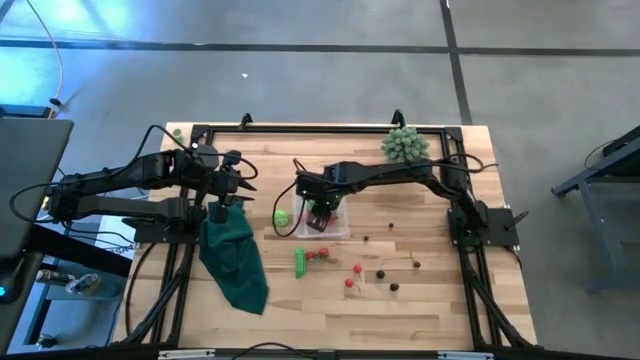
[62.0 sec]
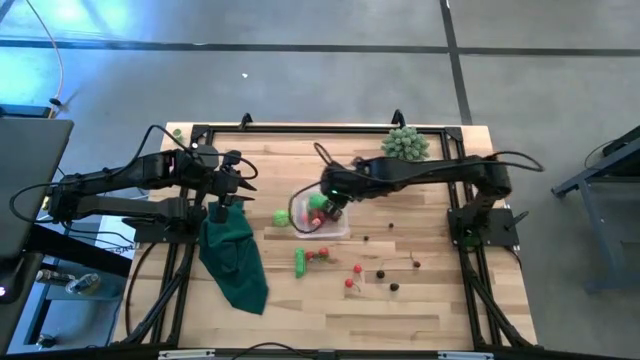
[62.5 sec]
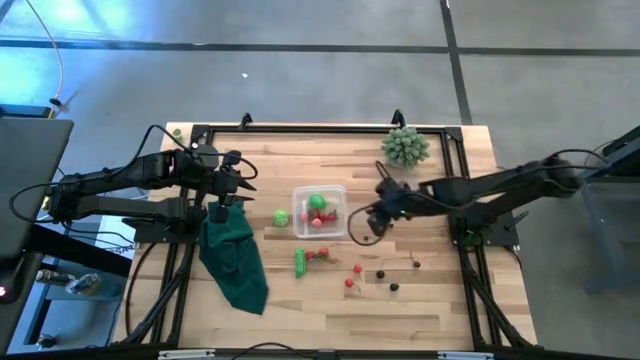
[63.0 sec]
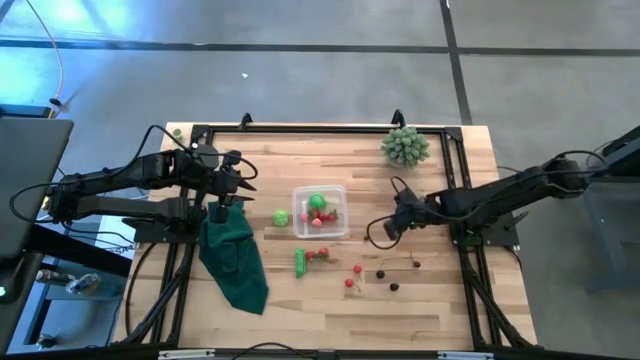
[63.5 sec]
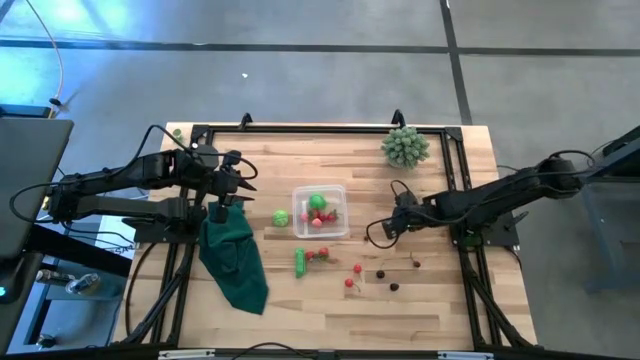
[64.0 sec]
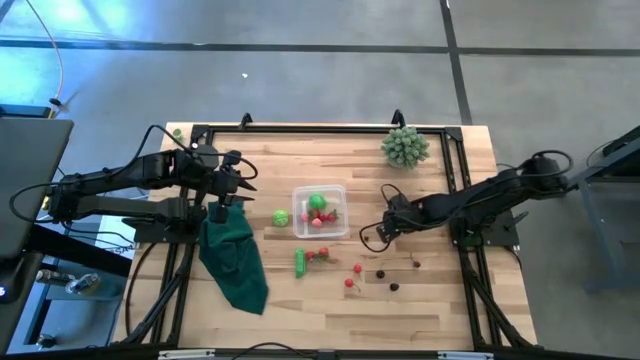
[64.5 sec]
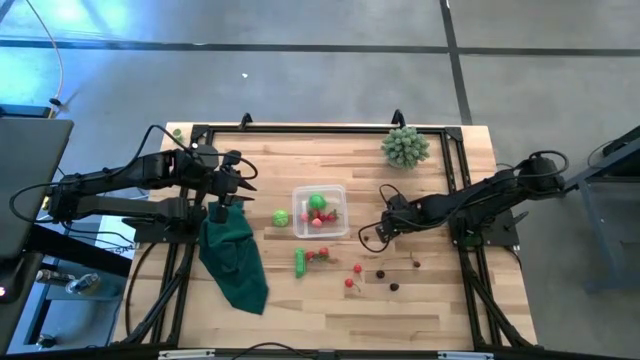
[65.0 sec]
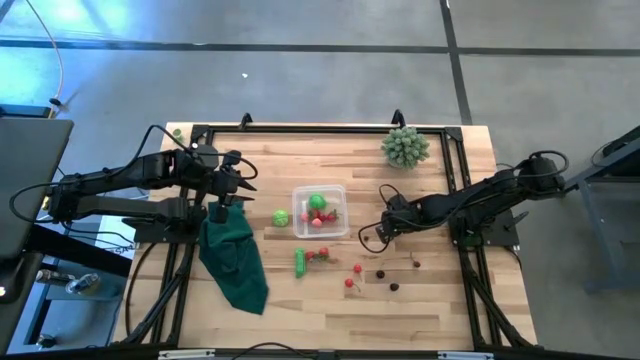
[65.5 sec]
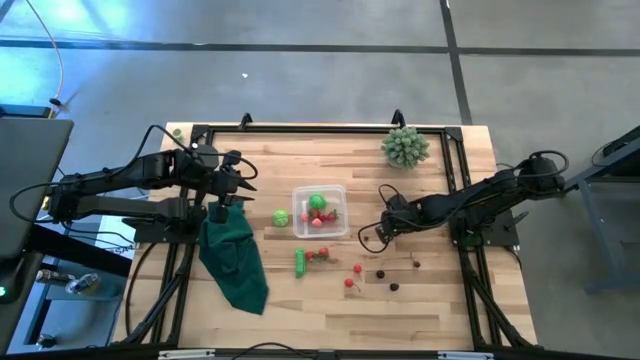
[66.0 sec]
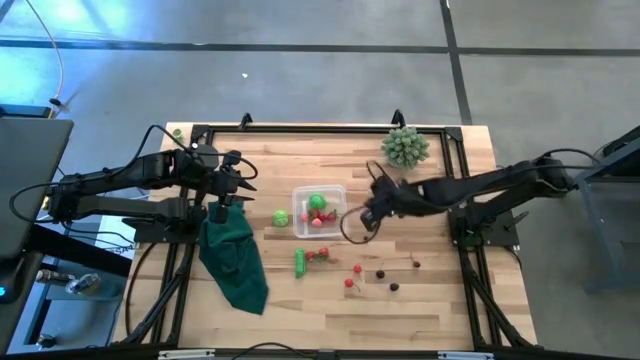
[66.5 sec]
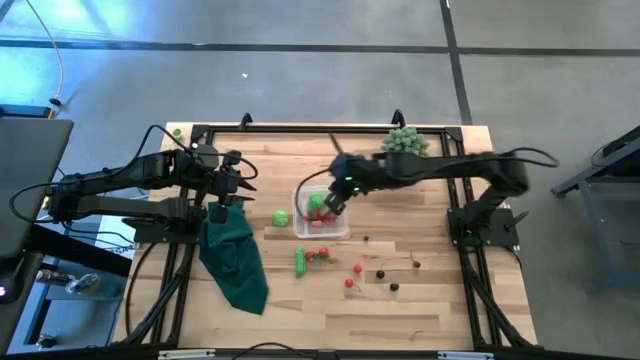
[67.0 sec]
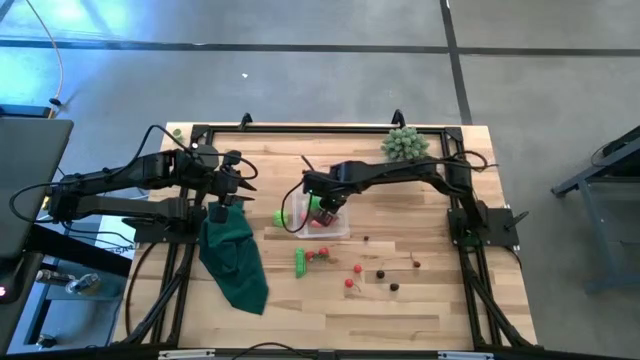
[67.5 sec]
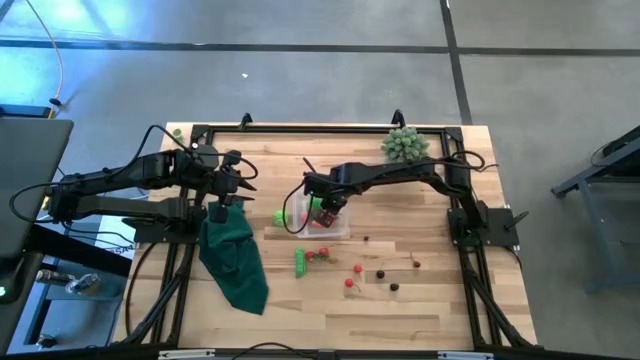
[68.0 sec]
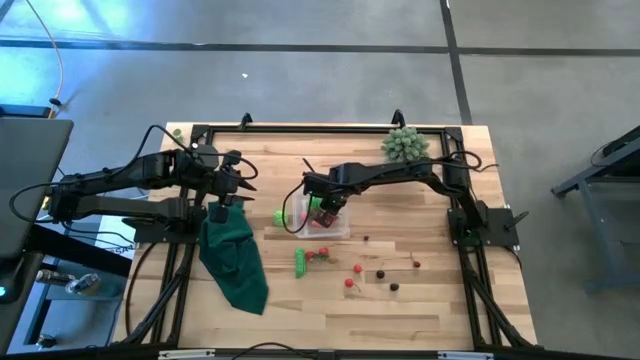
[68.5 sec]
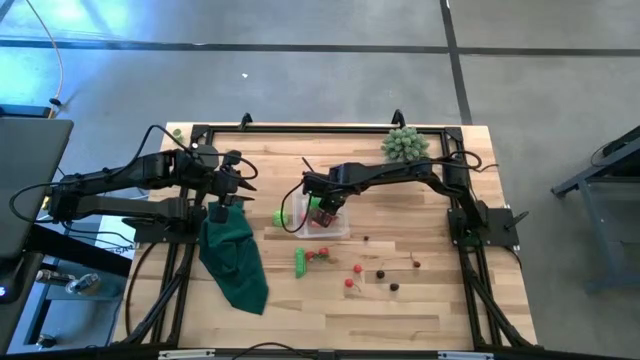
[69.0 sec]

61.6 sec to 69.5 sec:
Task: Pick and placing Produce into tupperware
Put the blueberry into the transparent bin

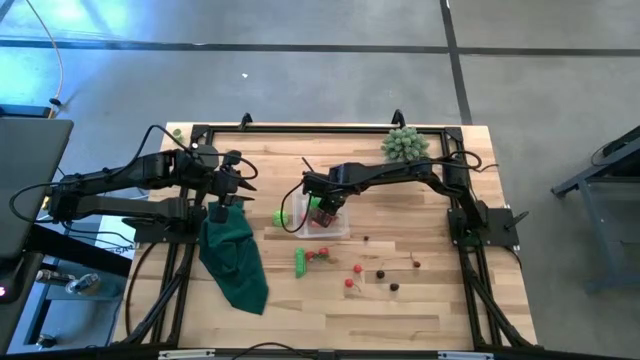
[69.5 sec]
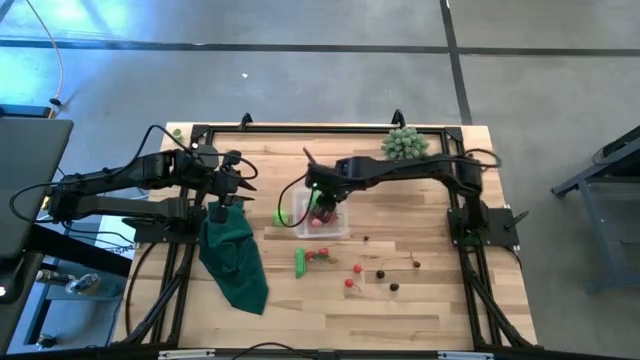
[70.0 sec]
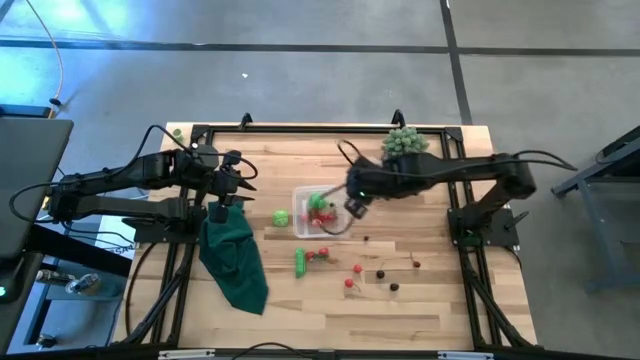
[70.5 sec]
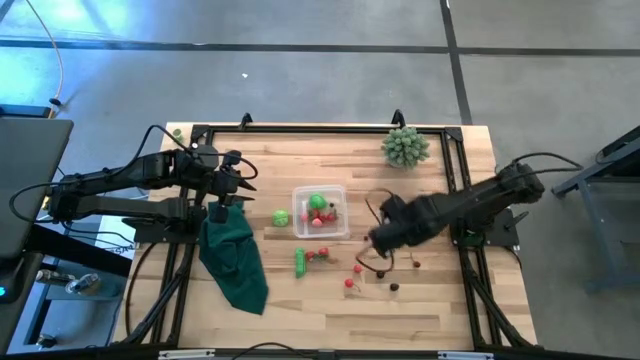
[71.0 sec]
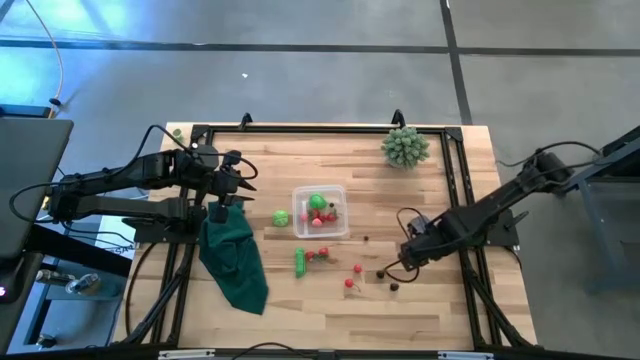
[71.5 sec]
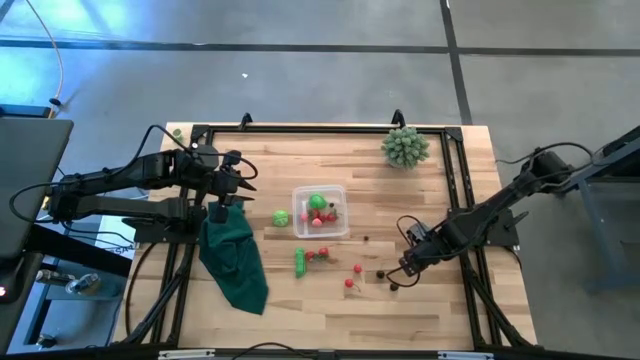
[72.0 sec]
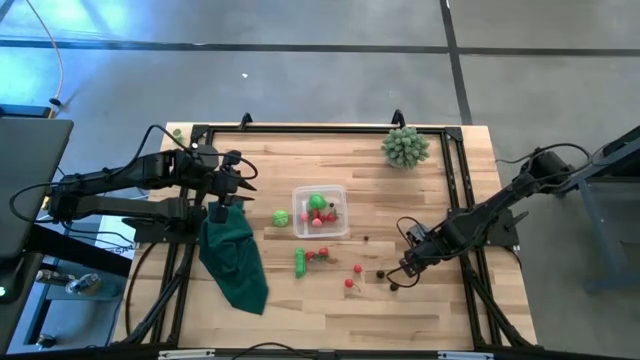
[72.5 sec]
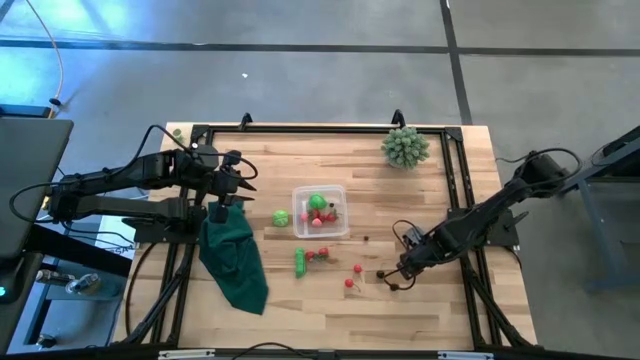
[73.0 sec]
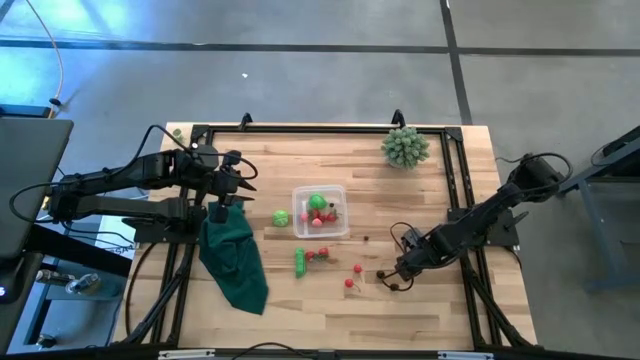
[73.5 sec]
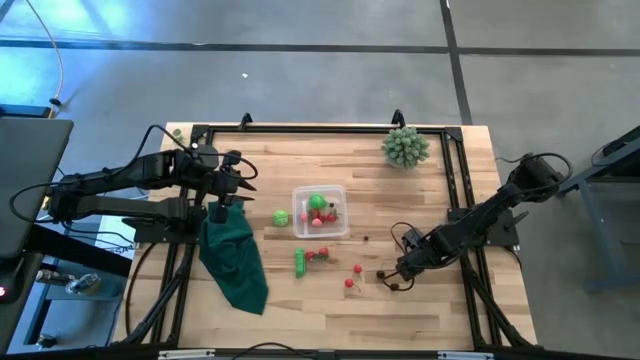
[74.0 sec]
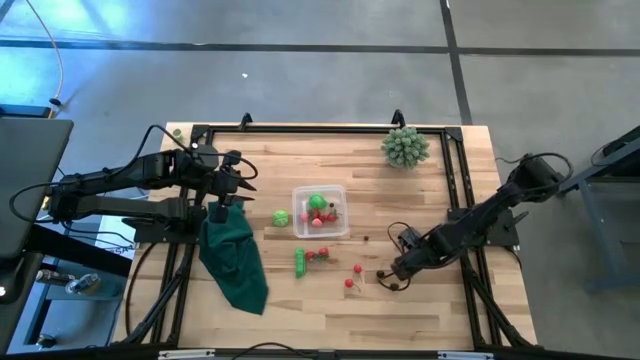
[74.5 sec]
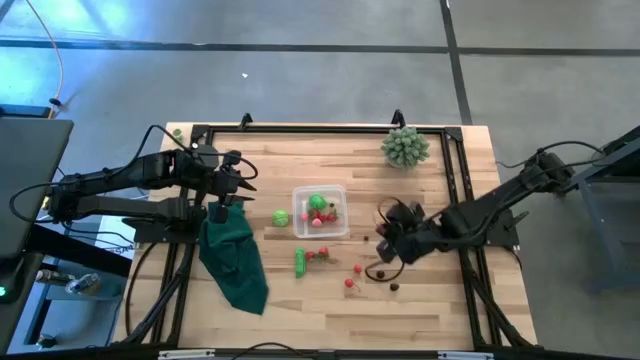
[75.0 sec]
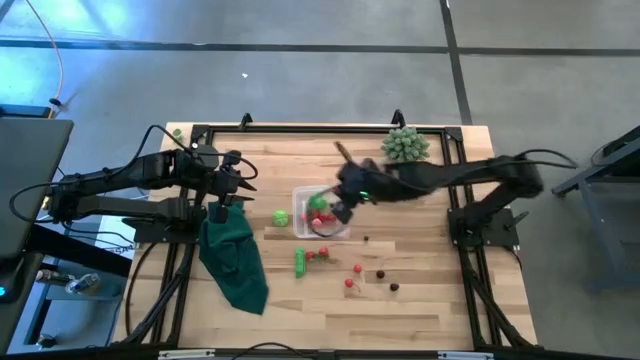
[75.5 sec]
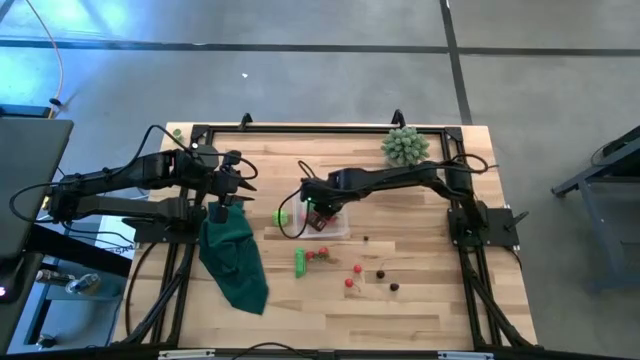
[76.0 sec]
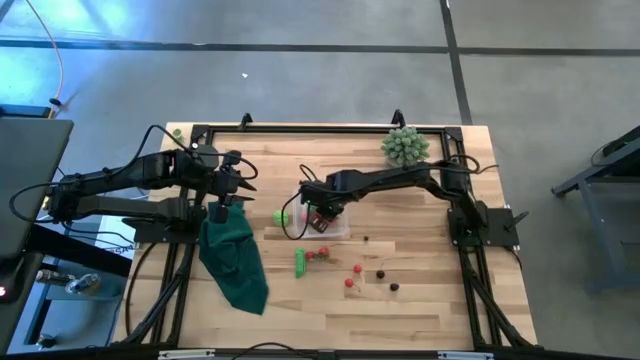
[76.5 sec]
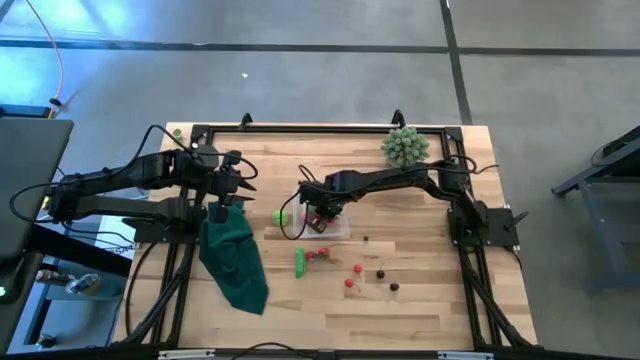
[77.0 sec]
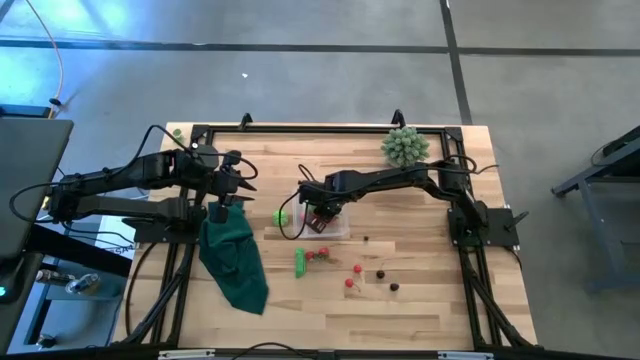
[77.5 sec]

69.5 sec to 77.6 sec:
Put the red cherry into the transparent bin

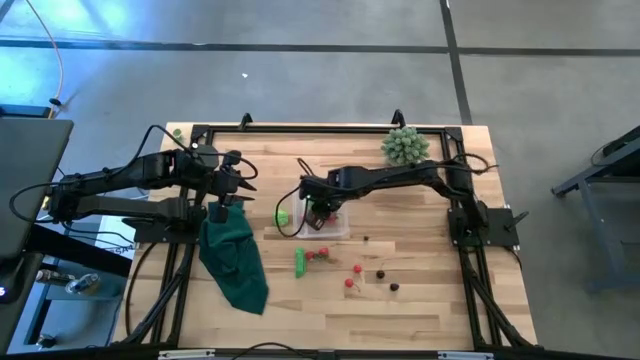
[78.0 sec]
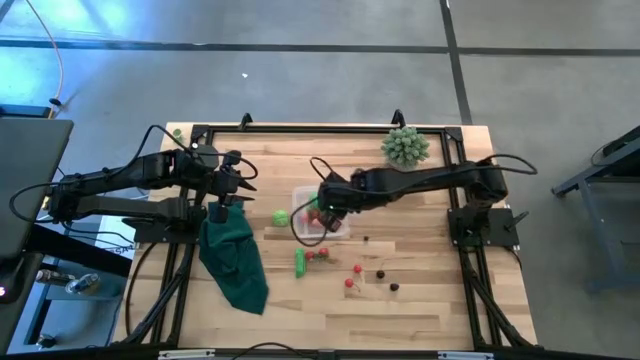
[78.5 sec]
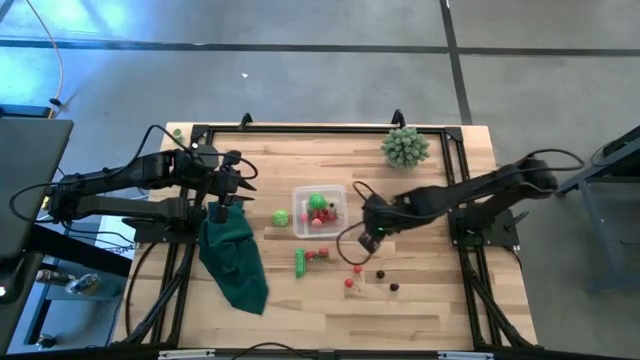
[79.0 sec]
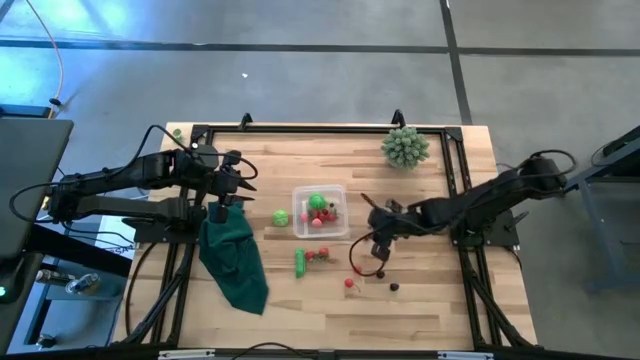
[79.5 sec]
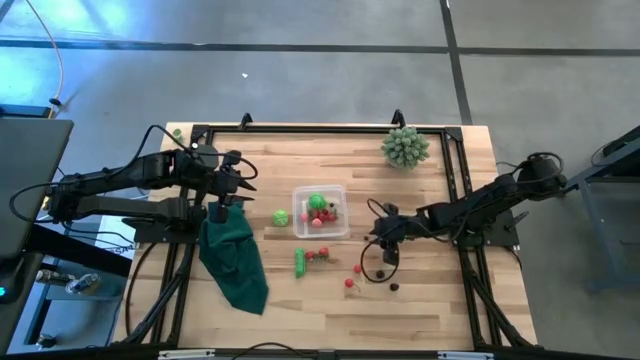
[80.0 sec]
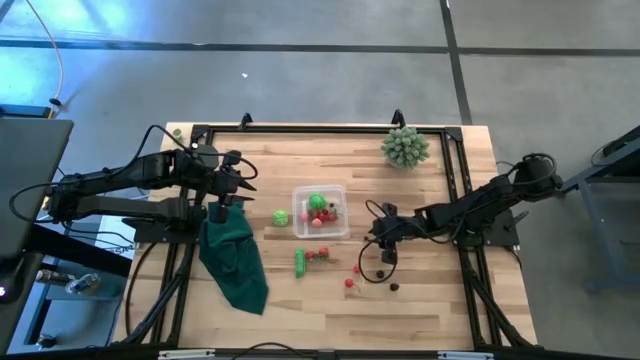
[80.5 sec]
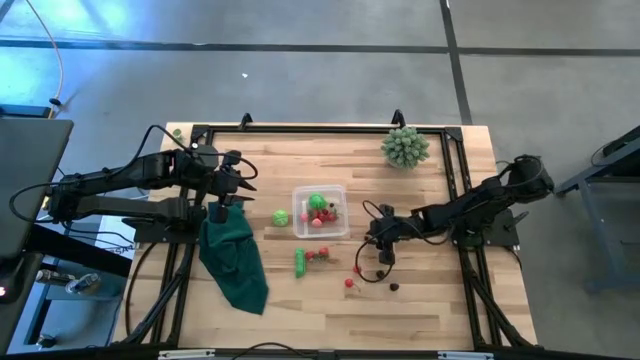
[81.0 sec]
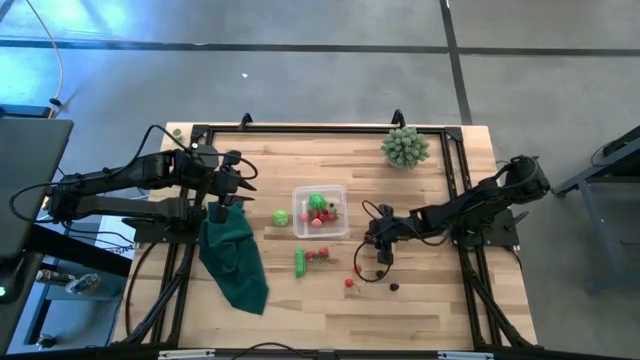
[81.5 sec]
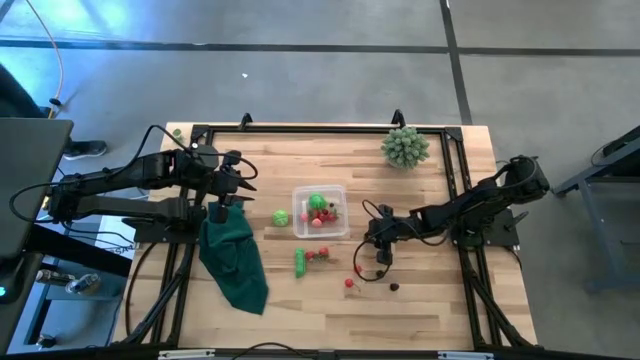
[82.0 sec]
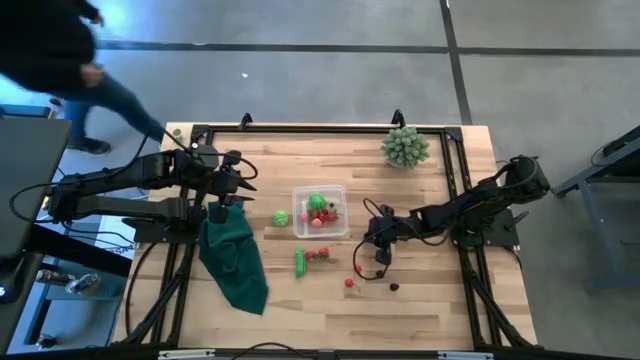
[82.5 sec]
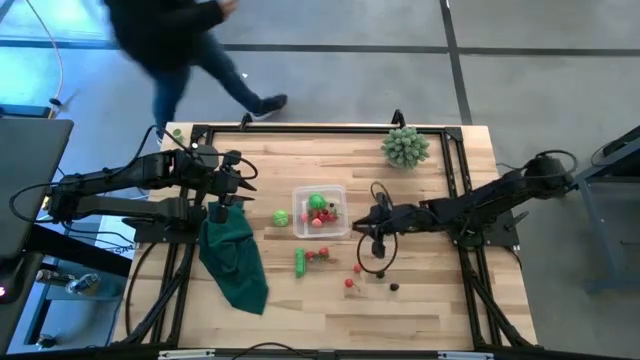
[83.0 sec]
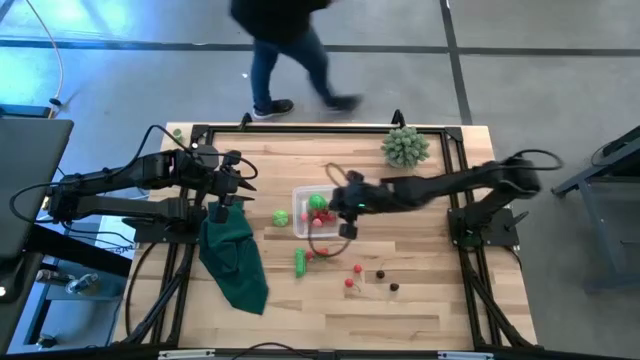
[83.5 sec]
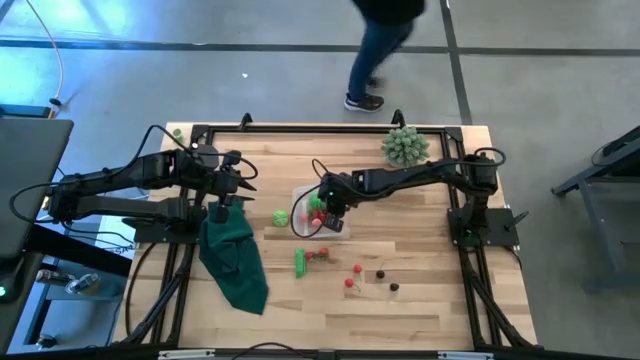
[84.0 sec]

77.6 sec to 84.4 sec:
Put the blueberry into the transparent bin
